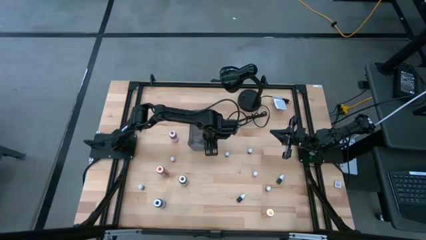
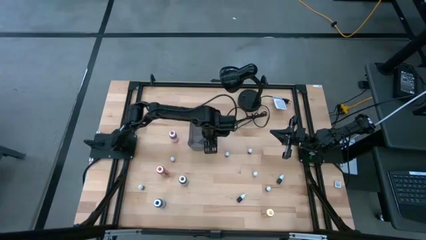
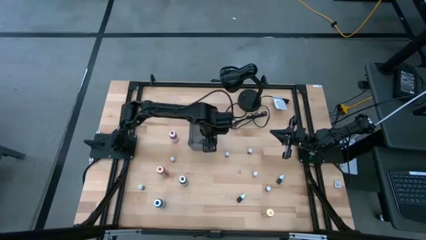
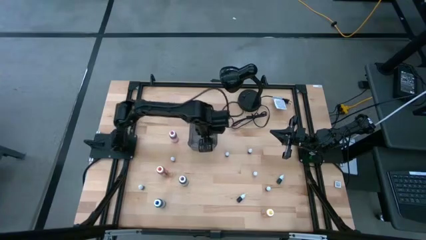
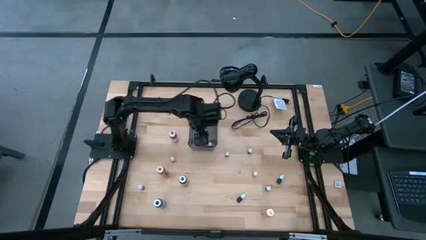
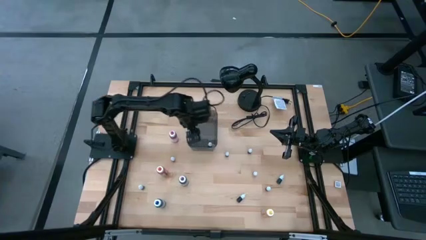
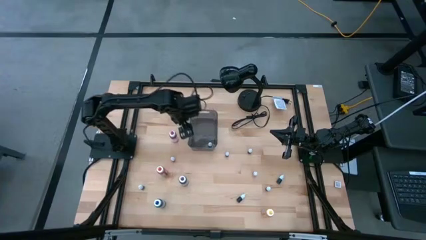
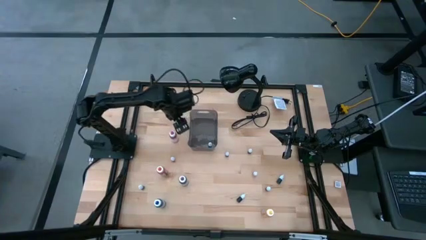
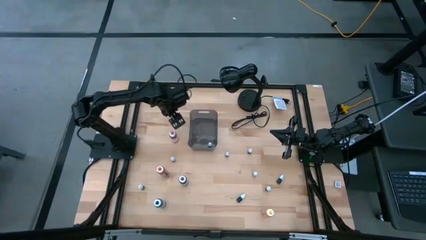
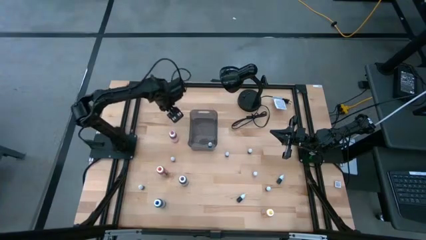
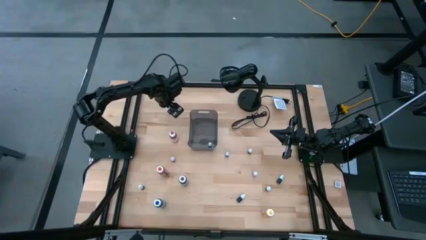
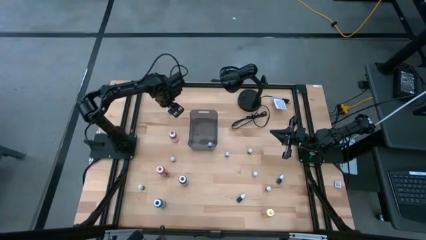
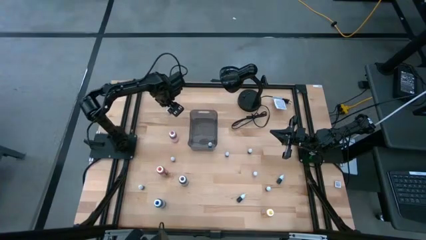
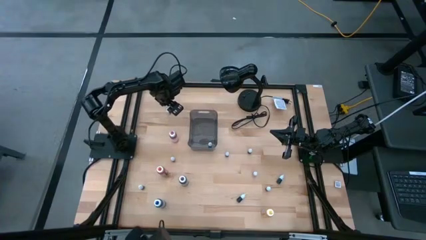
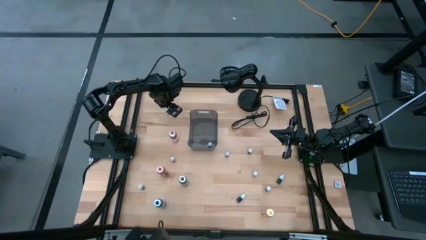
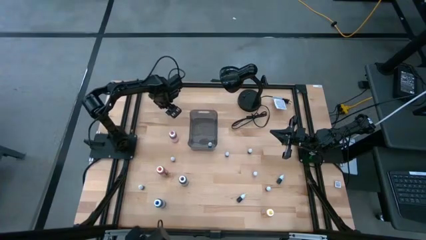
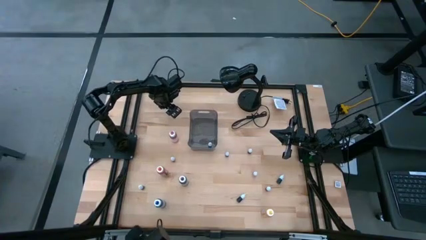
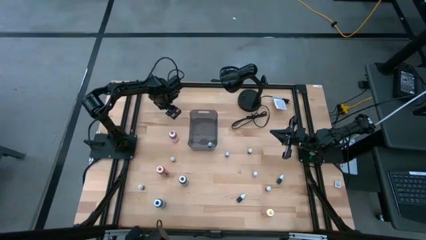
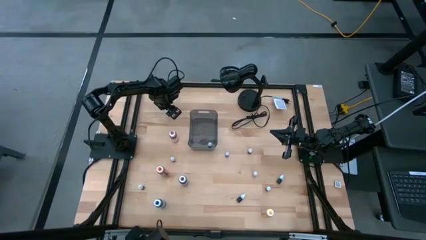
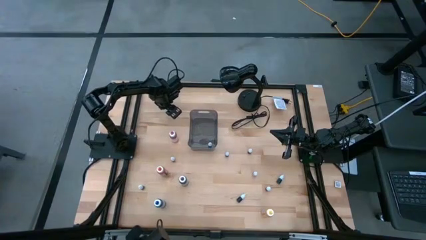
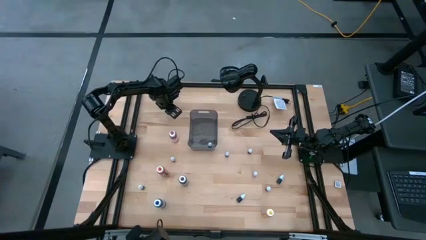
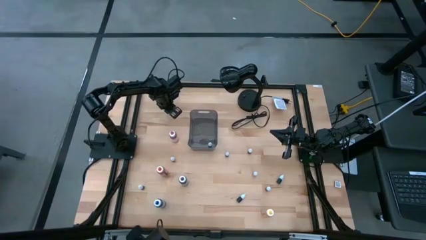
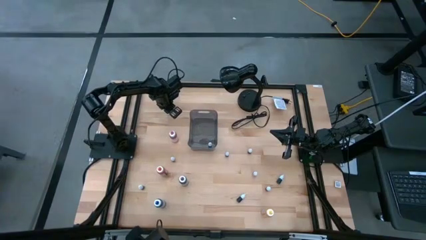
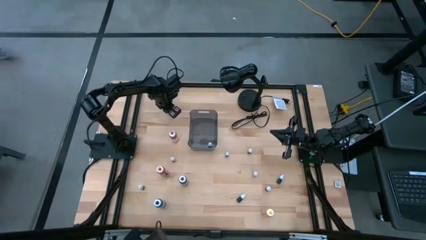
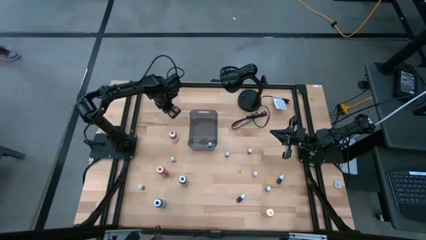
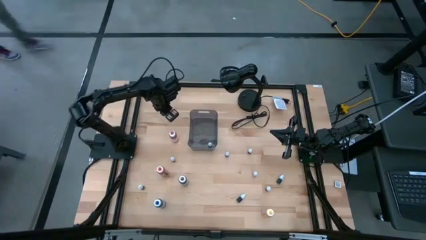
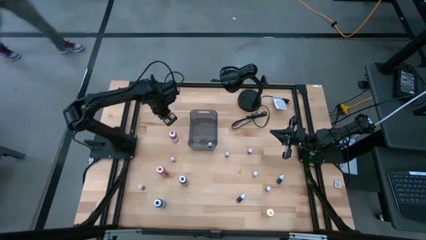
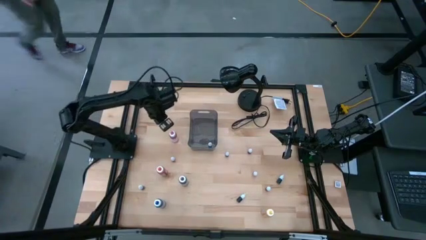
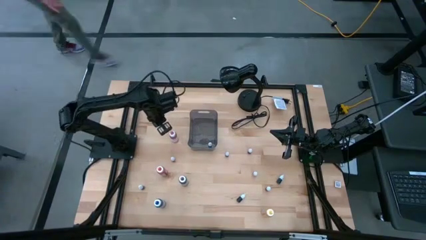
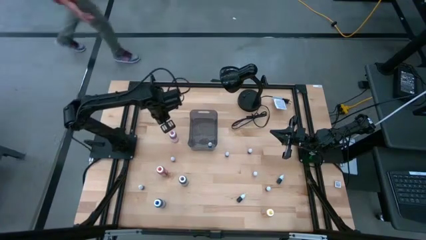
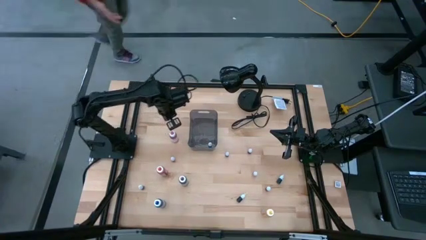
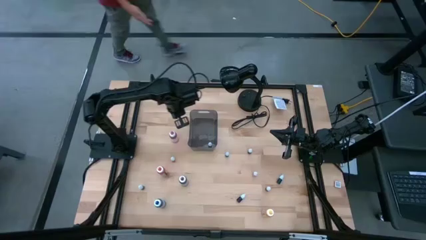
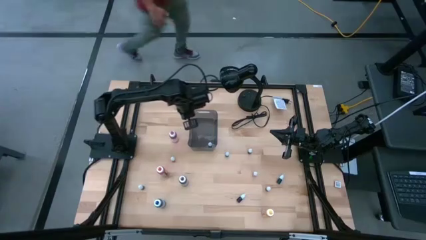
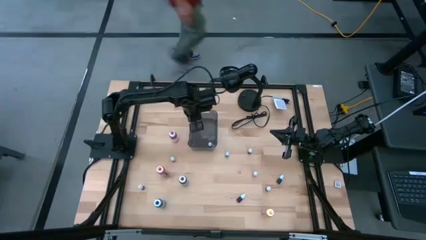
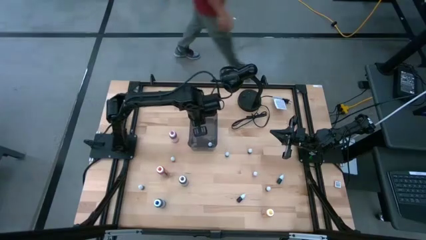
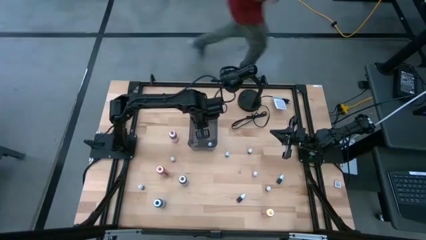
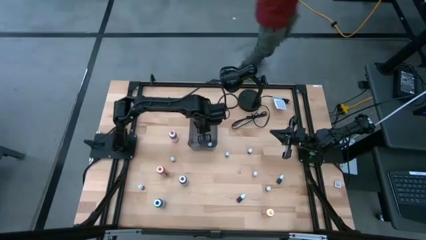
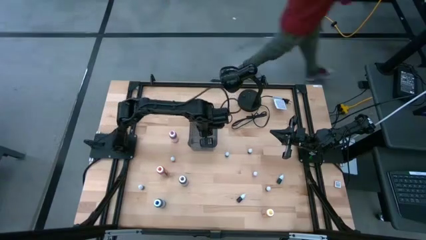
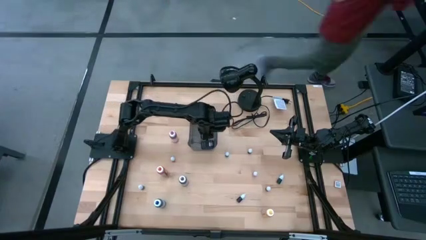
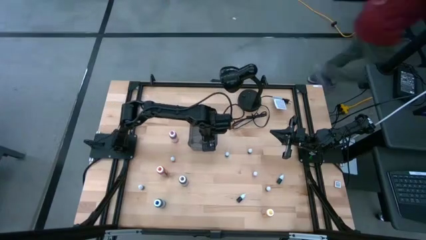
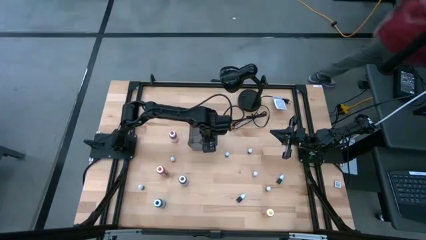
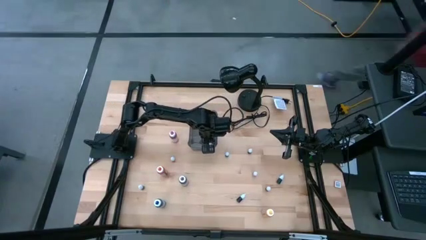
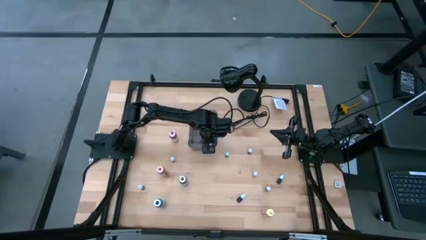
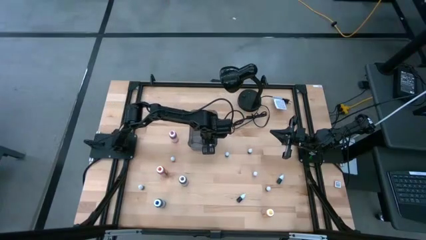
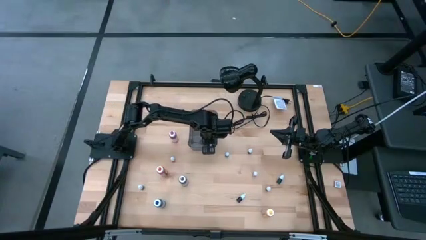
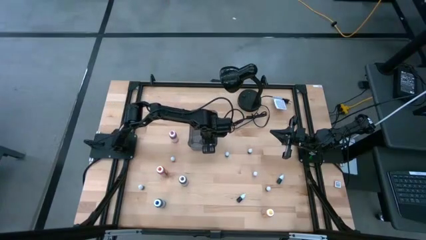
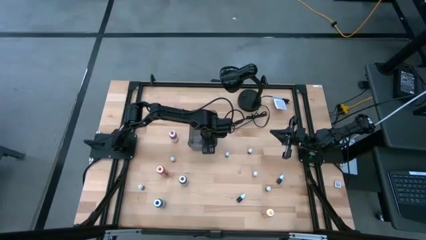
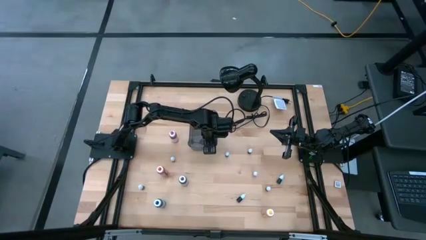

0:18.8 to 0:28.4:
Task: Pick & Place food coloring
Put the top left small black food coloring bottle into the gray transparent bin
